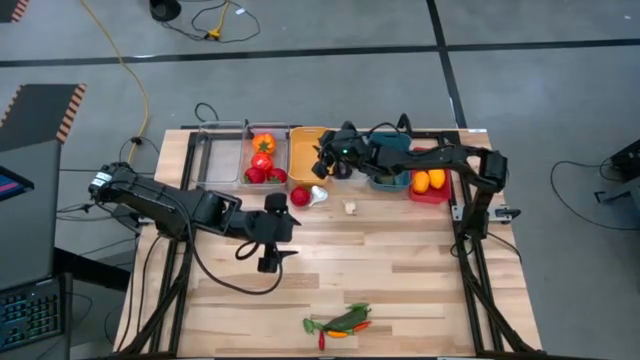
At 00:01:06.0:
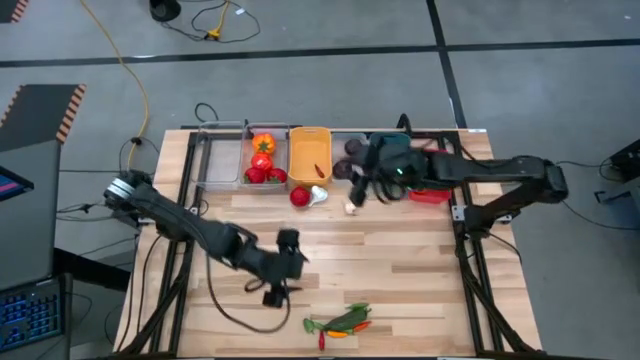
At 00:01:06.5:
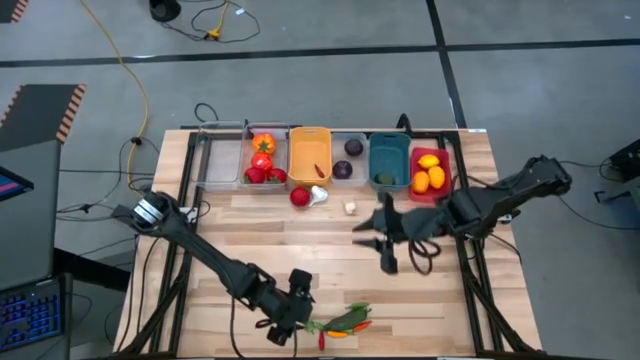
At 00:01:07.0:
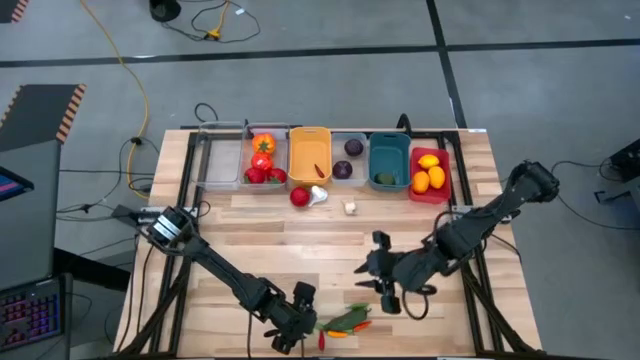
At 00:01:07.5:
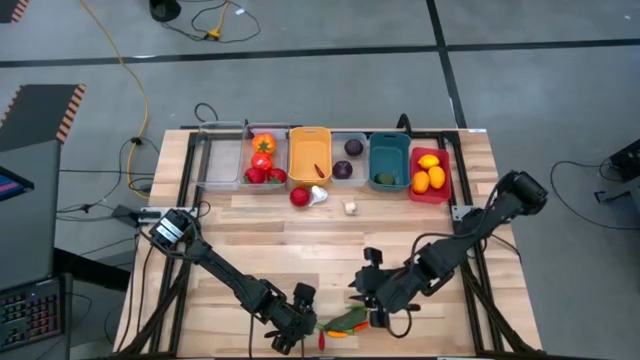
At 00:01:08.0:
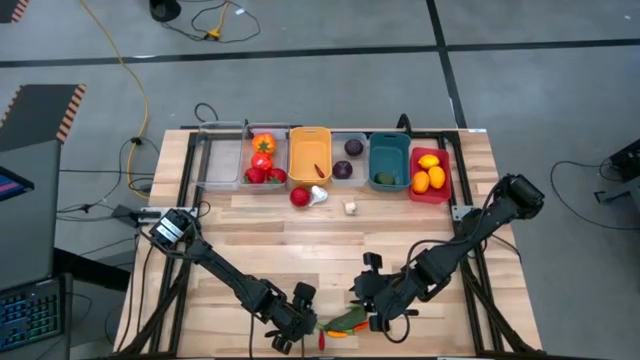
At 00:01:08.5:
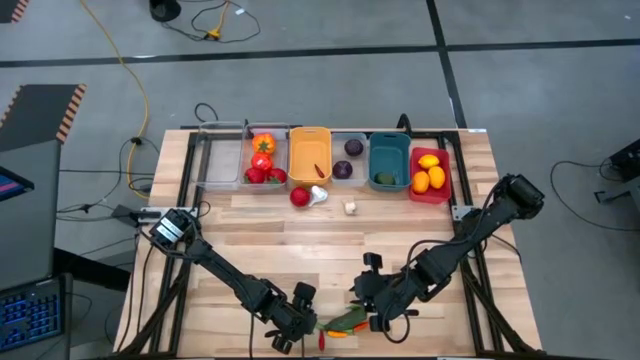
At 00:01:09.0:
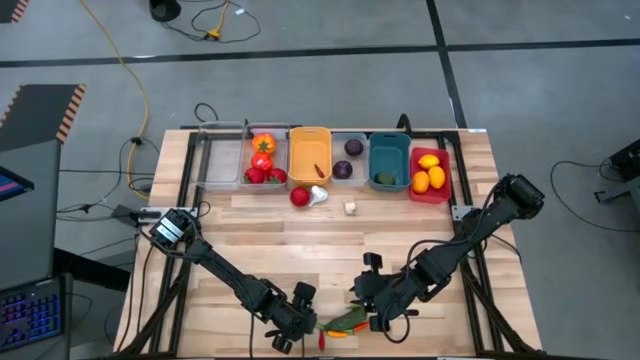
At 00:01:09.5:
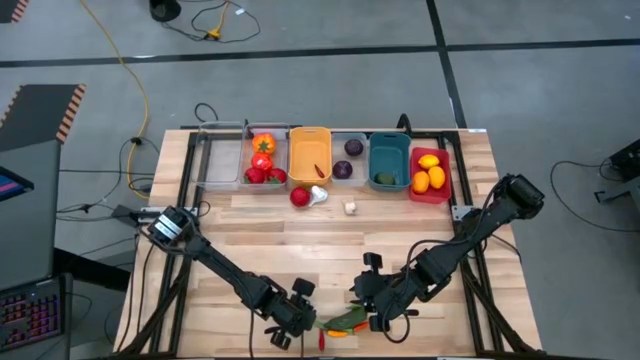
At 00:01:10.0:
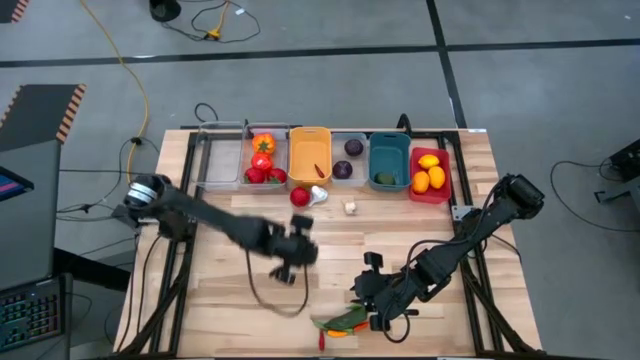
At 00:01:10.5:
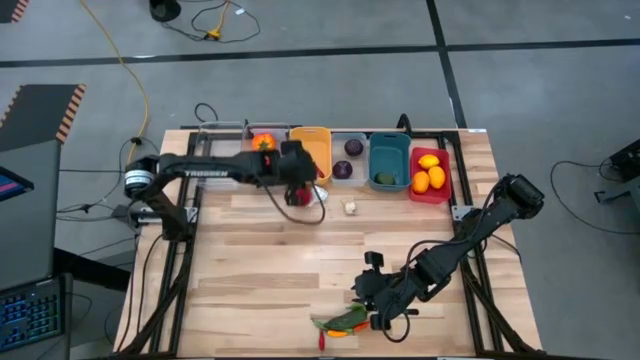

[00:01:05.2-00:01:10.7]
Task: Sort produce into baskets
Put the green chili pepper into the yellow bin

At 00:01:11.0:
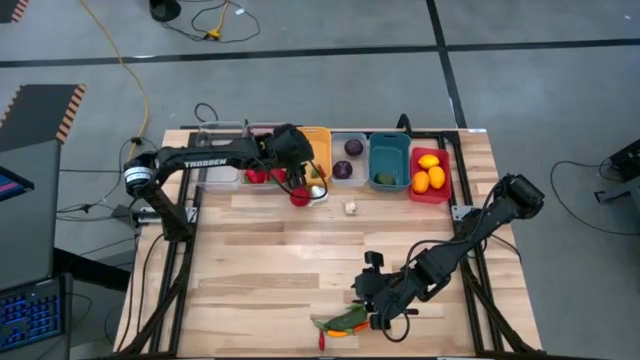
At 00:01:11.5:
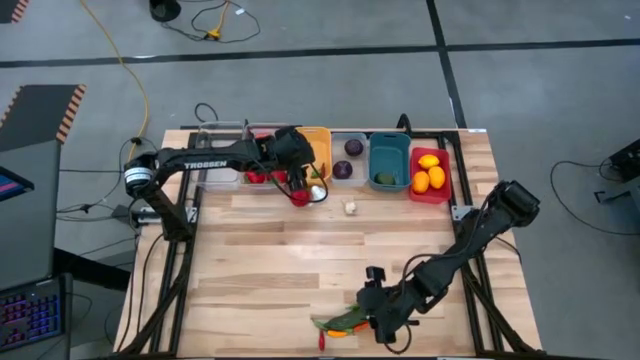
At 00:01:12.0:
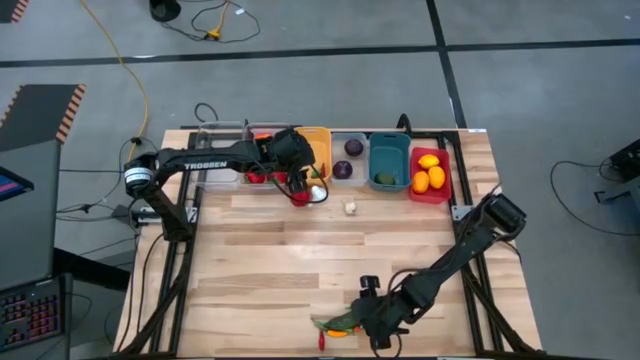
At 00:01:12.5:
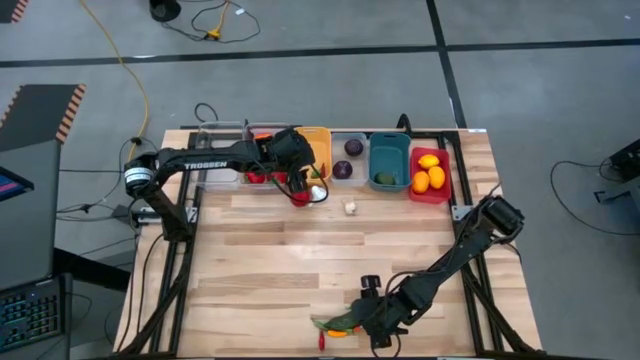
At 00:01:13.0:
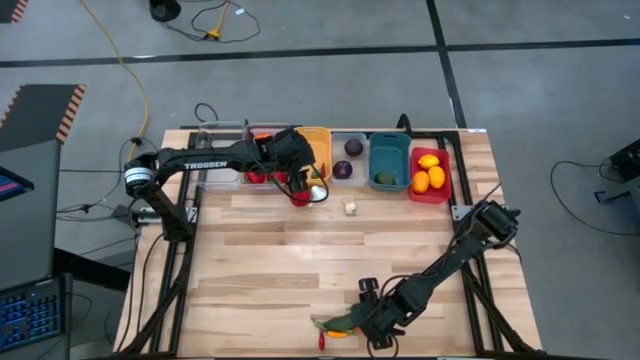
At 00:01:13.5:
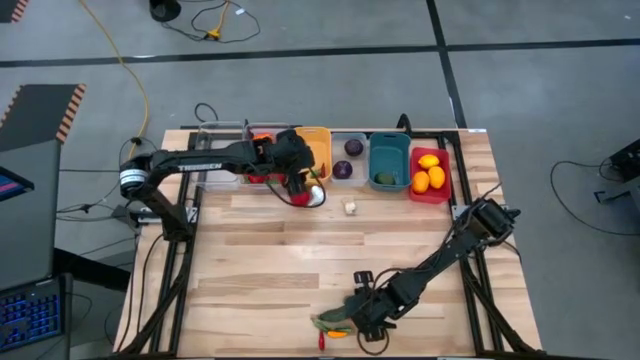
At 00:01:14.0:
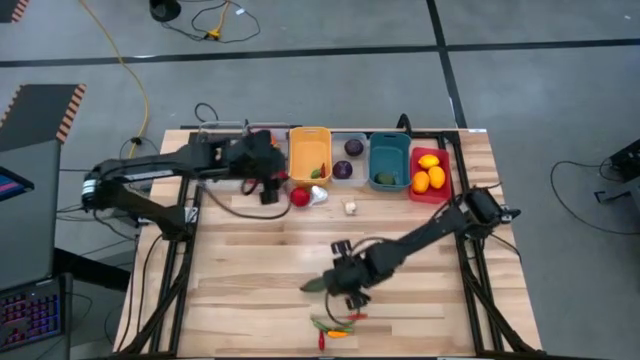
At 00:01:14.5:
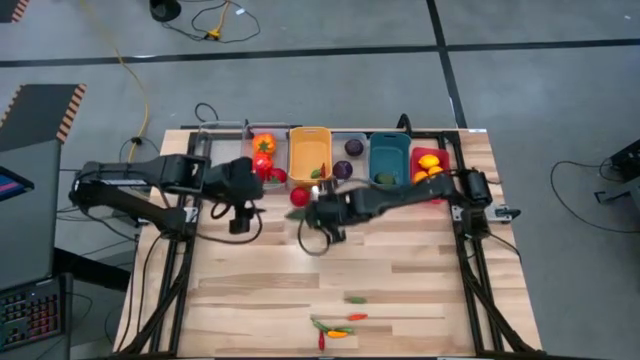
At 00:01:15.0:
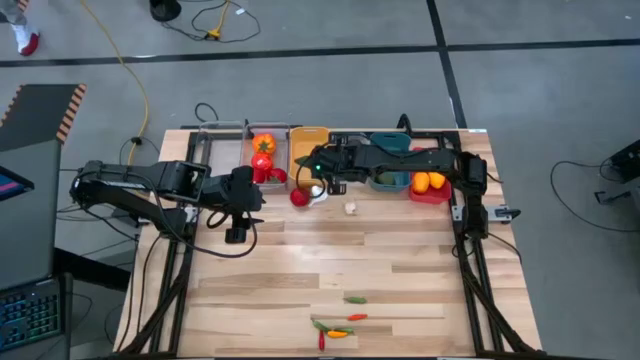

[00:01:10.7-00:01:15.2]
Put the green chili pepper into the yellow bin

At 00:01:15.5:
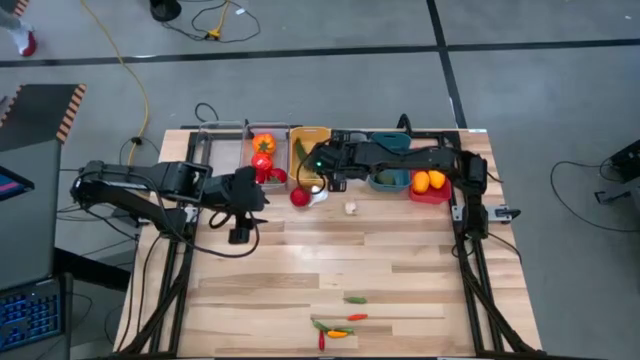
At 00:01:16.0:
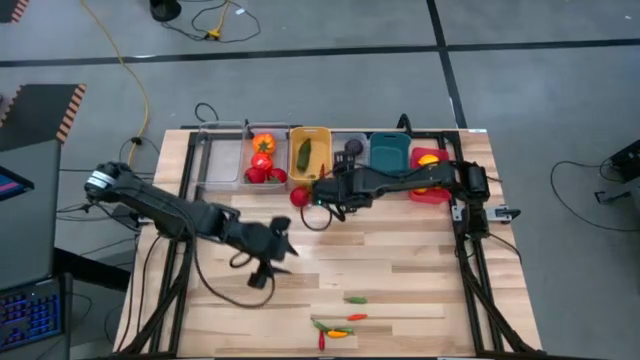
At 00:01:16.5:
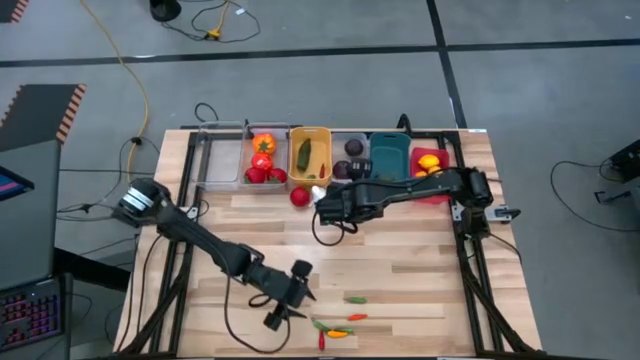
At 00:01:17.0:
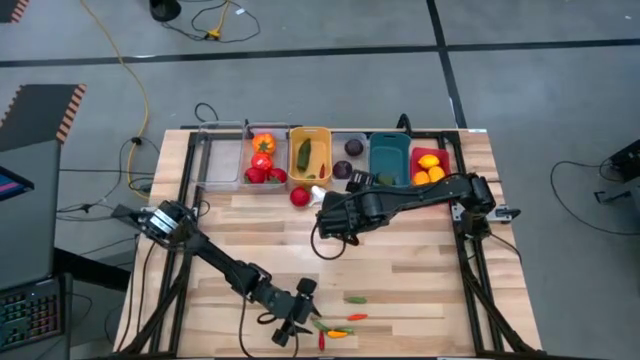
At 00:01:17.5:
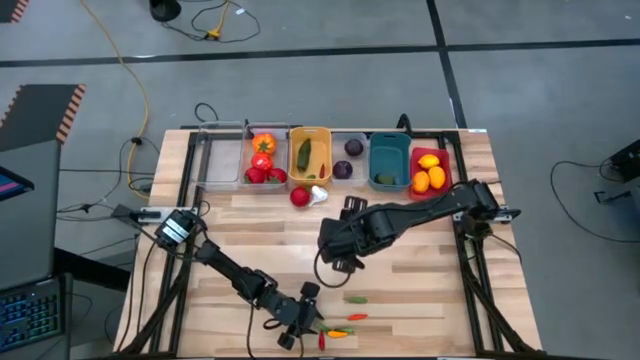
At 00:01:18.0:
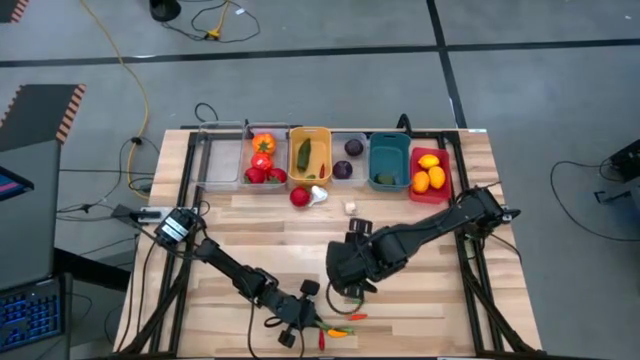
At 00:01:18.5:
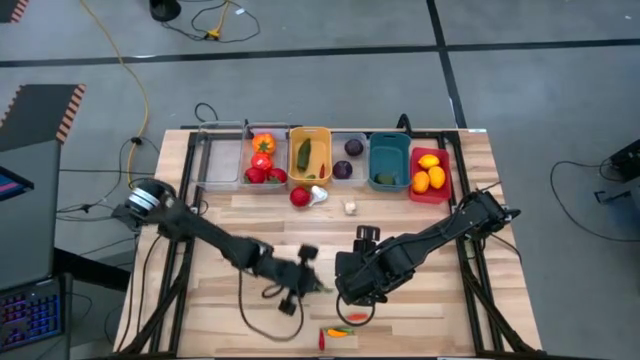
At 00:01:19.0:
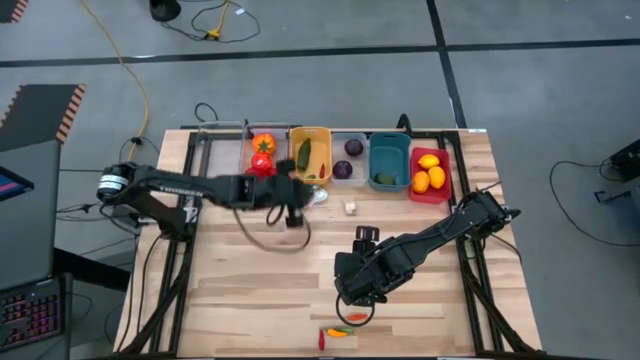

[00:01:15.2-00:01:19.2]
Put the green chili pepper into the yellow bin

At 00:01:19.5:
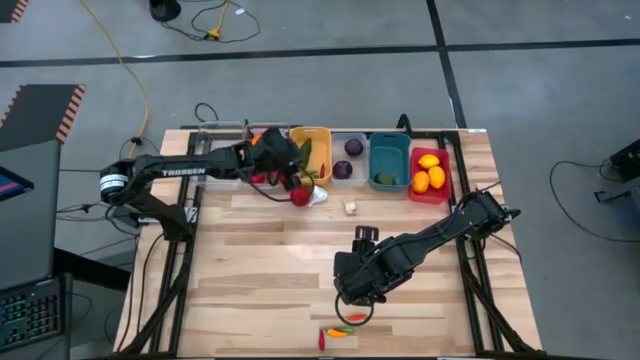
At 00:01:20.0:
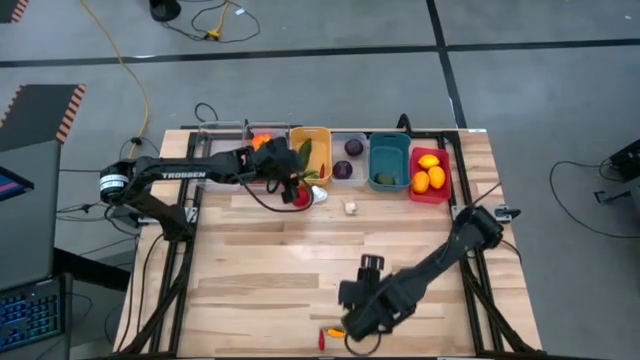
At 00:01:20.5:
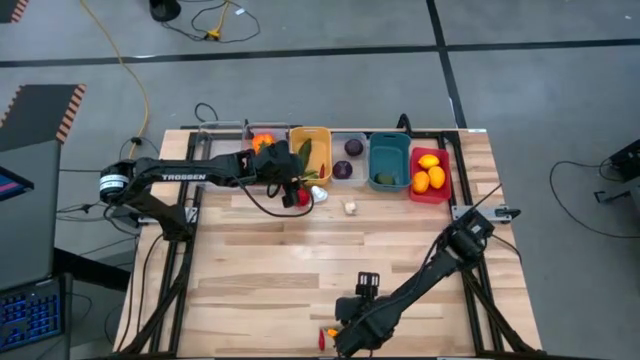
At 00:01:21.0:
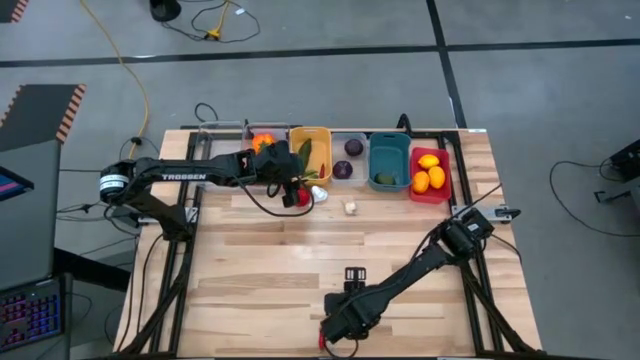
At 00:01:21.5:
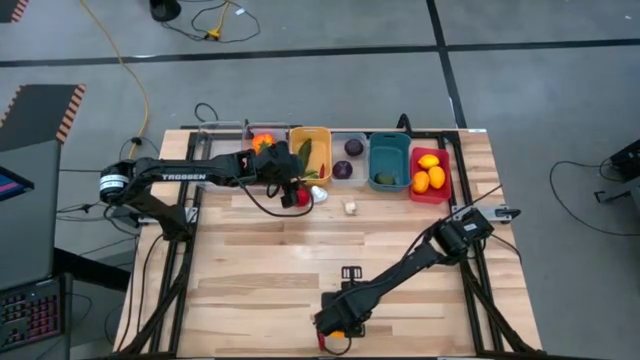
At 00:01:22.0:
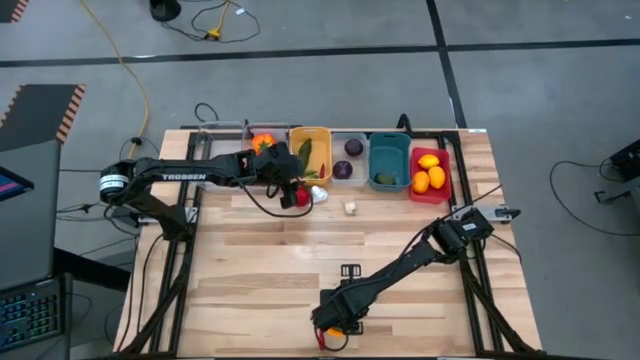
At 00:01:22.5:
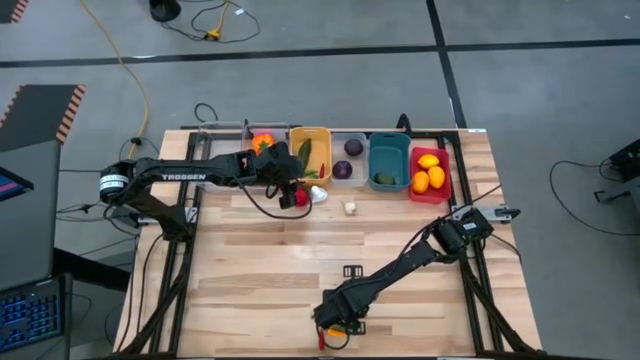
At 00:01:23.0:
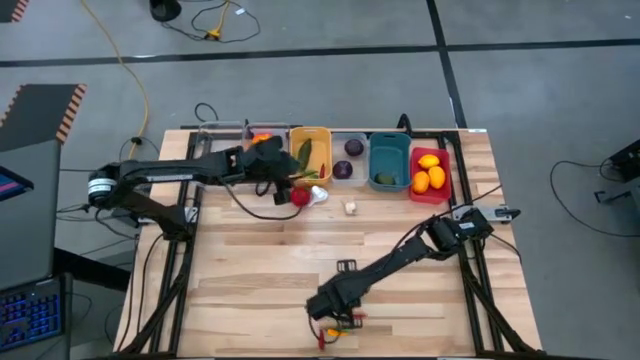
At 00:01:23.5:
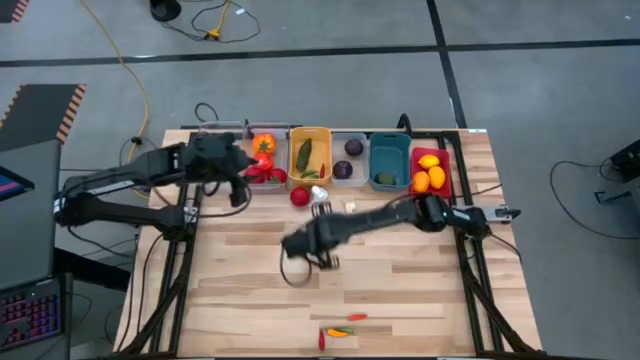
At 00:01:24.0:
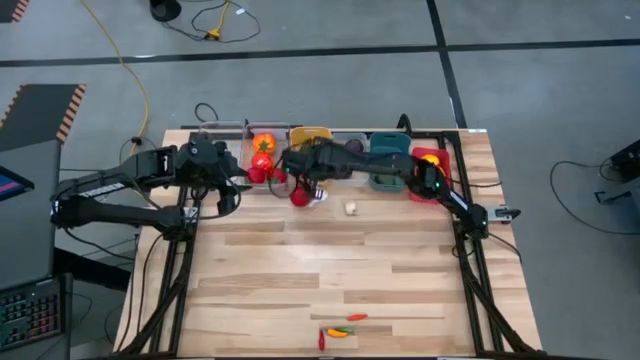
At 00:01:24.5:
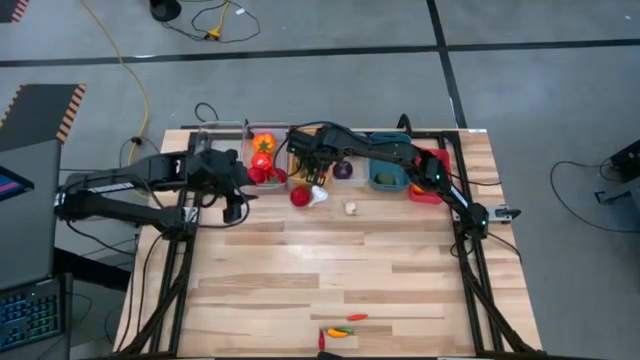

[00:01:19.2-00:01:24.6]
Put the green chili pepper into the yellow bin

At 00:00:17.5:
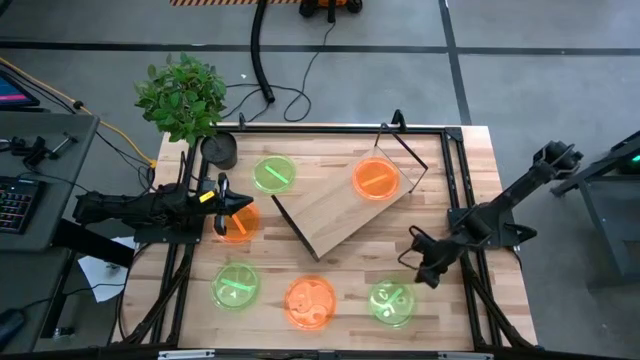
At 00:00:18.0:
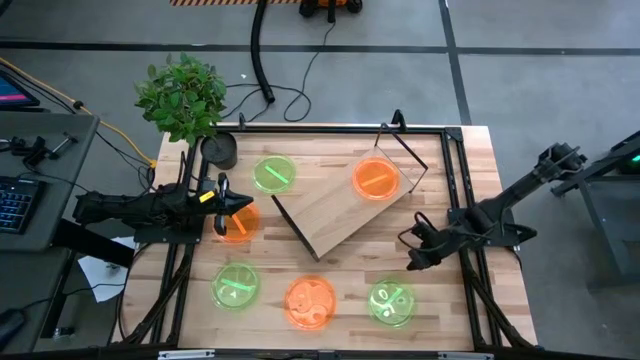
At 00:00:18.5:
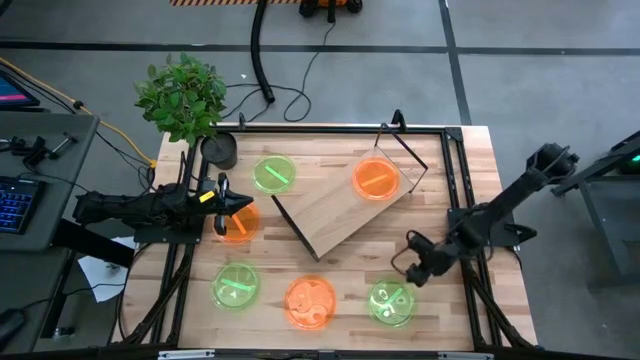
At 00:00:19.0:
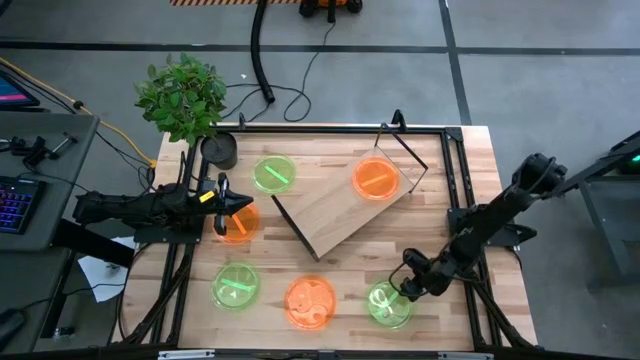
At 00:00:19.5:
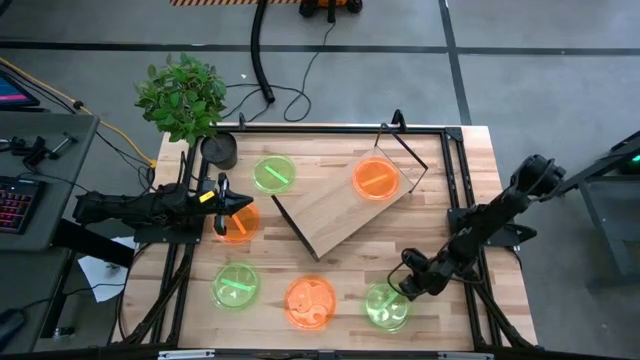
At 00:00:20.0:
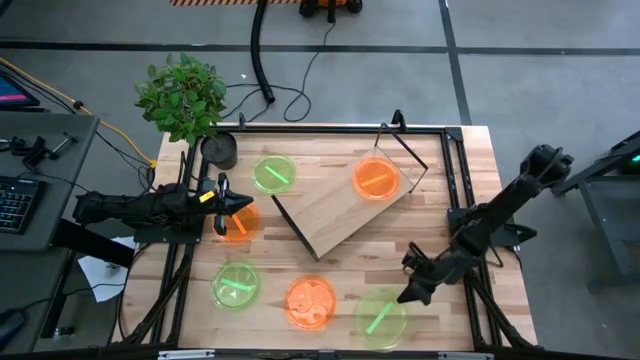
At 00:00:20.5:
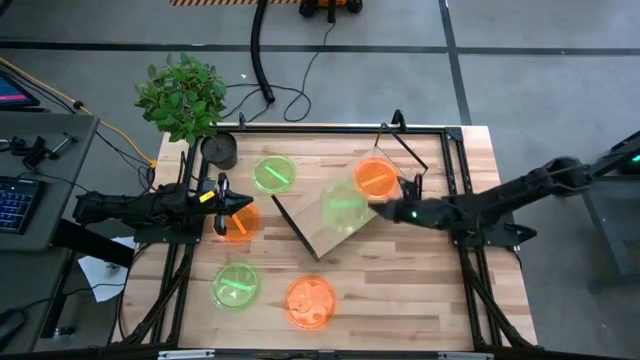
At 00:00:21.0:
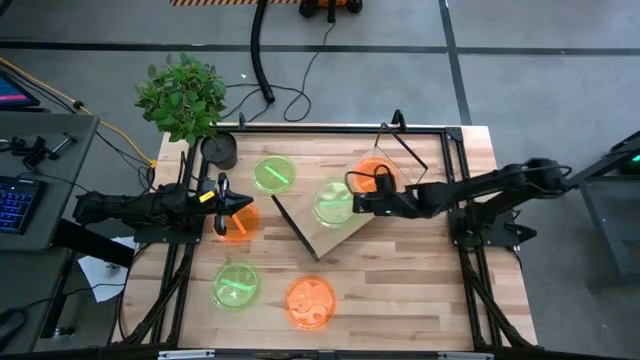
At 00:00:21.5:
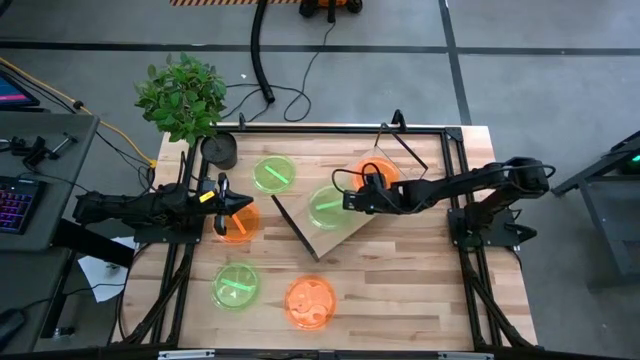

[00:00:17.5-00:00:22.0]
Task: Place and stack plates onto a shelf
Put the bottom right green plate on the shelf
